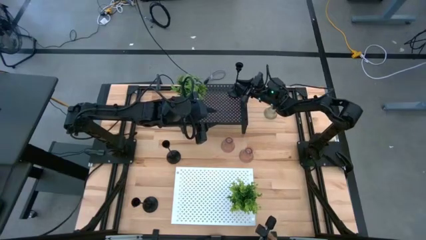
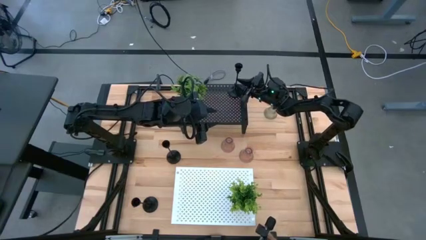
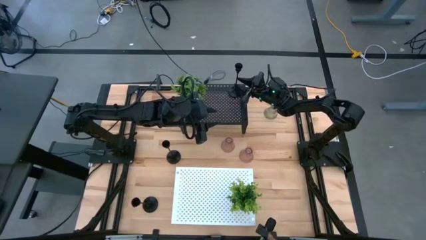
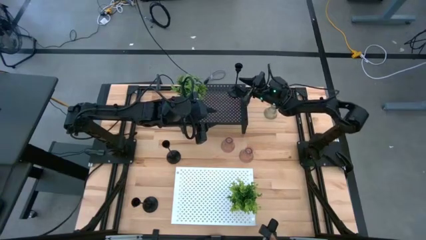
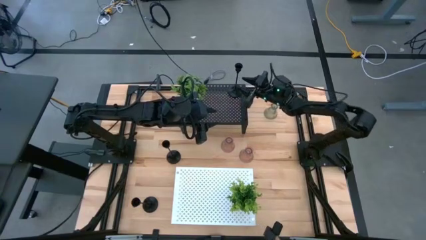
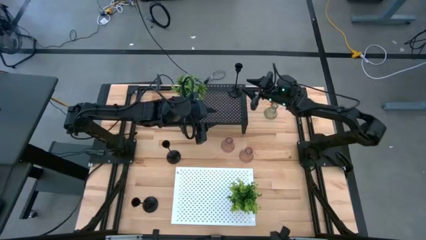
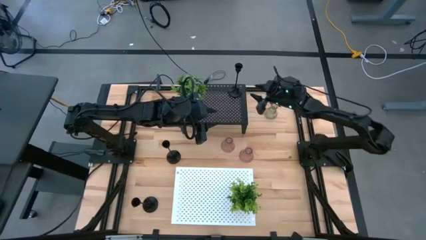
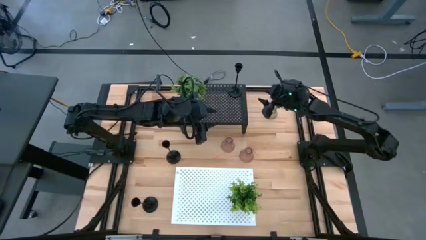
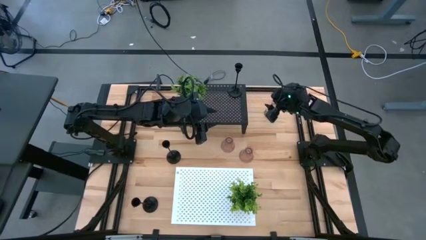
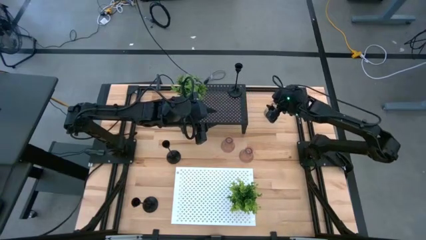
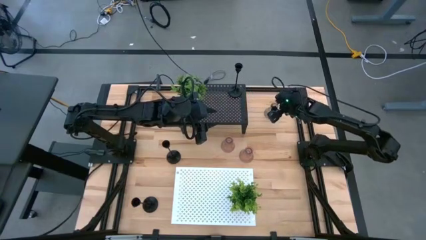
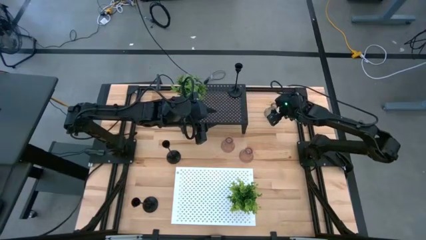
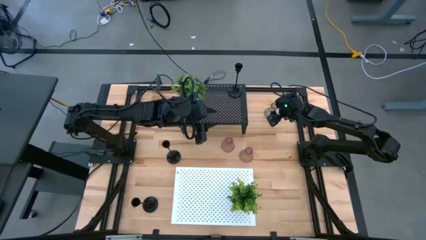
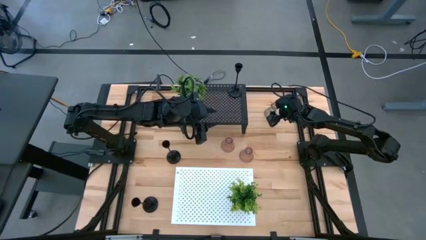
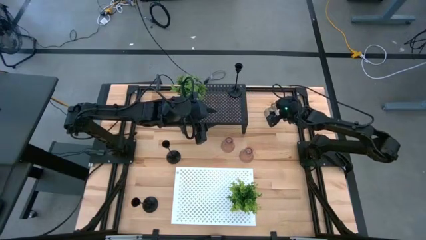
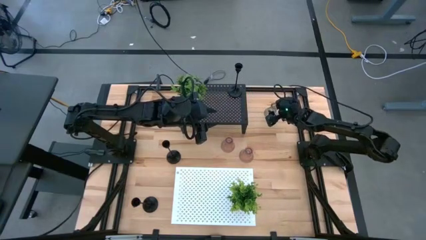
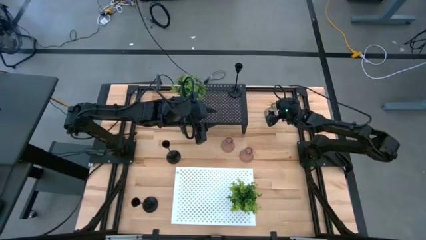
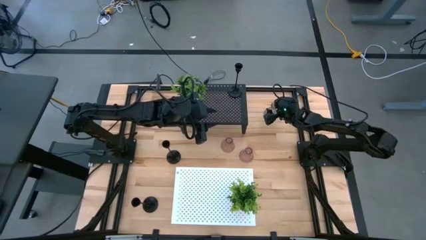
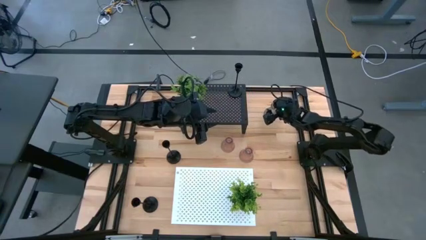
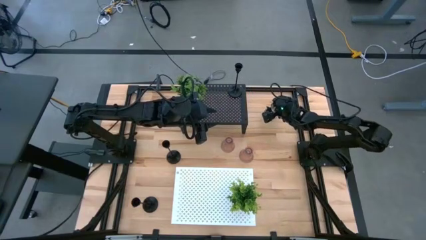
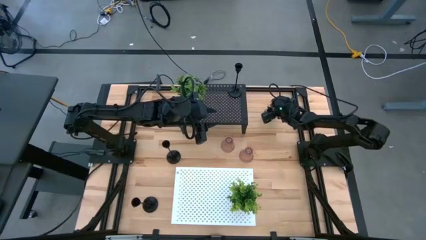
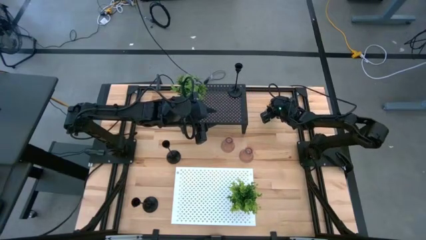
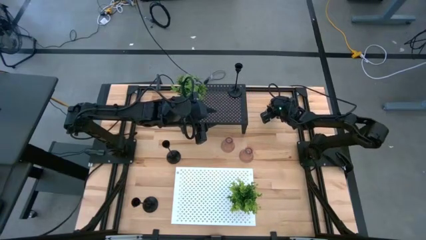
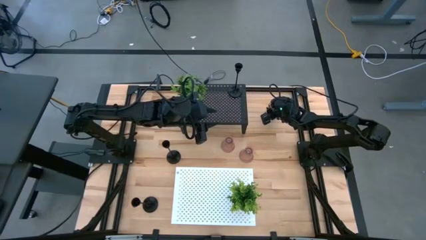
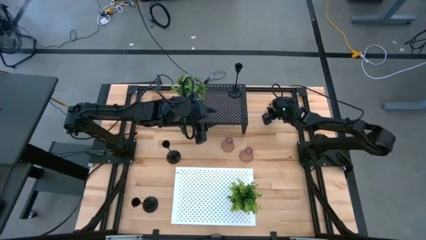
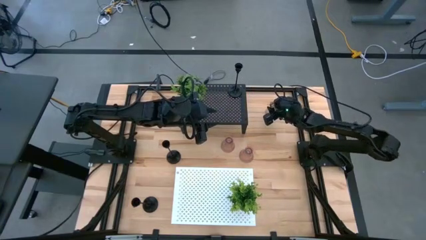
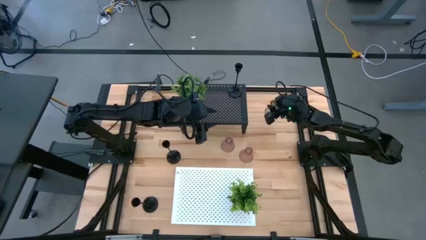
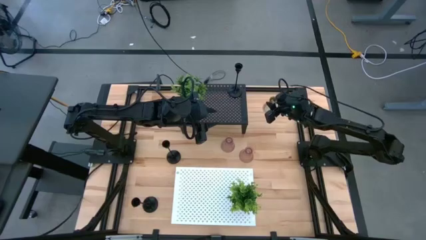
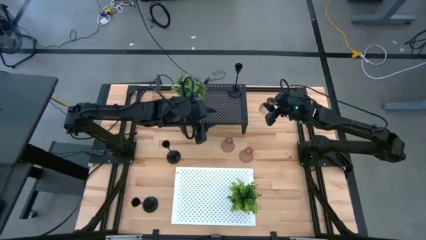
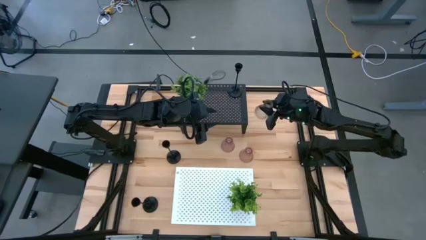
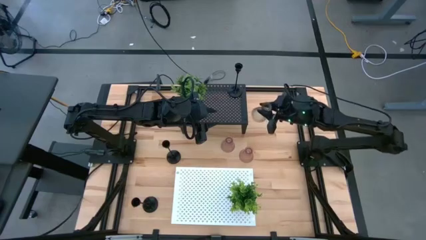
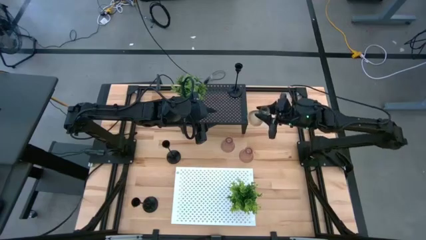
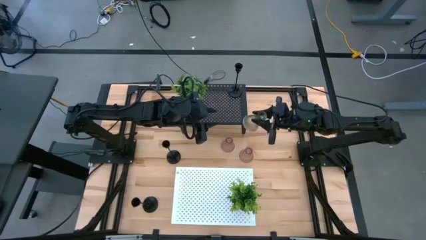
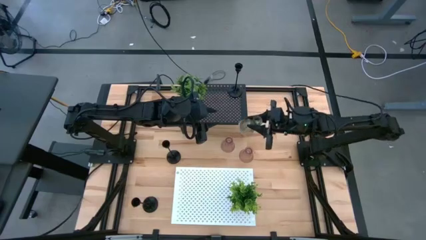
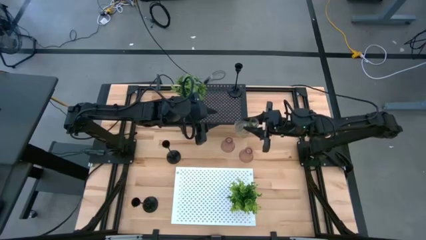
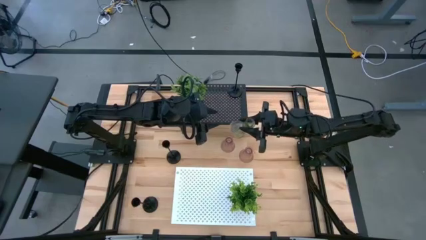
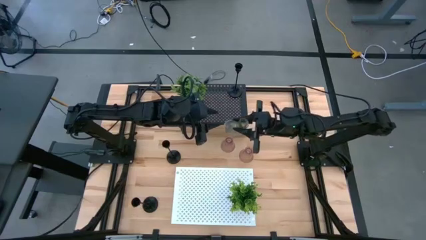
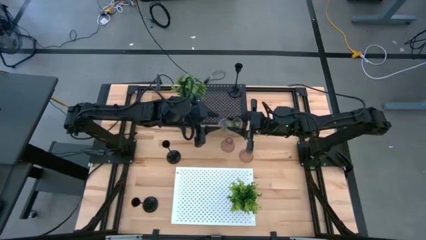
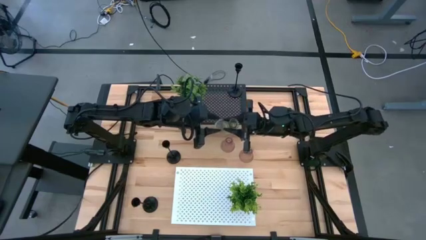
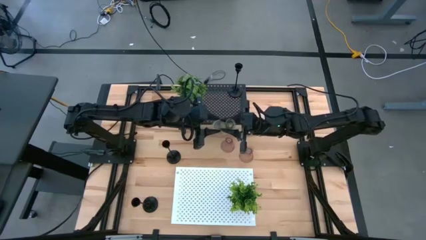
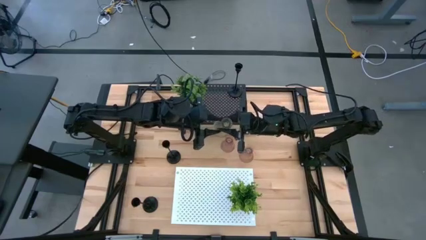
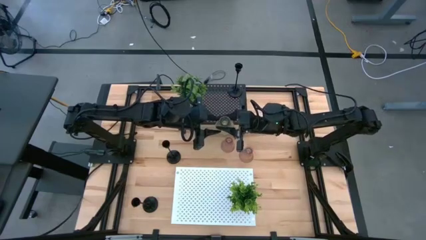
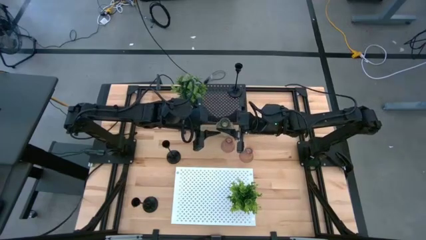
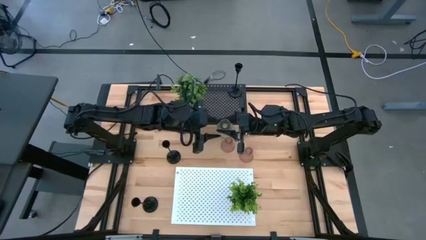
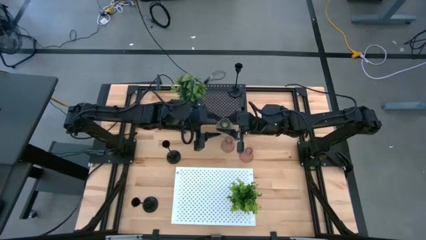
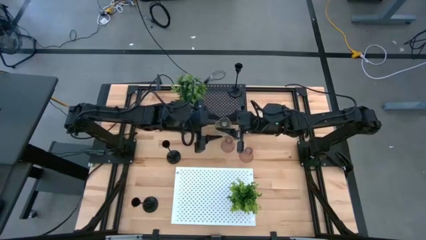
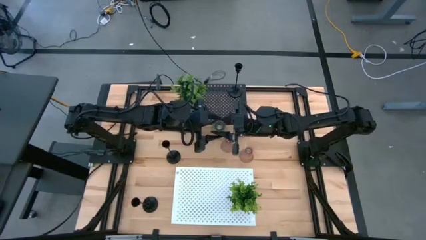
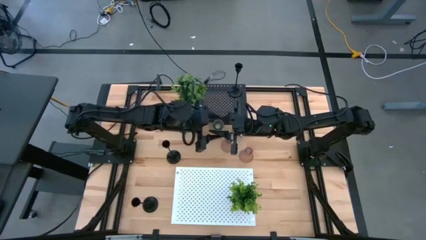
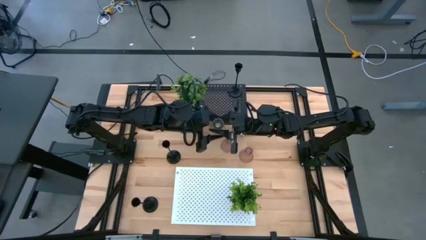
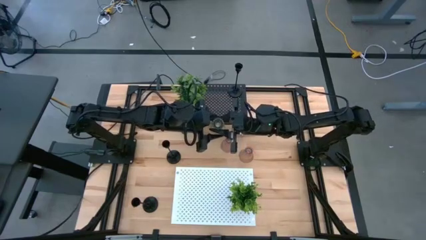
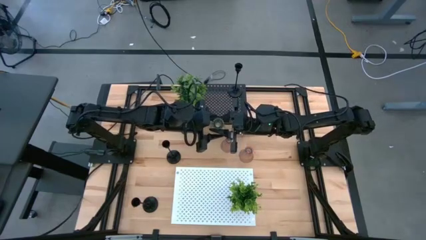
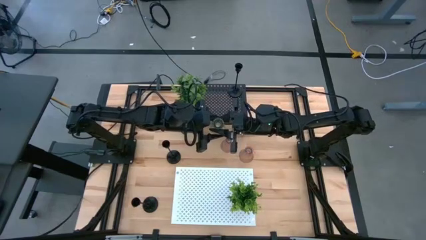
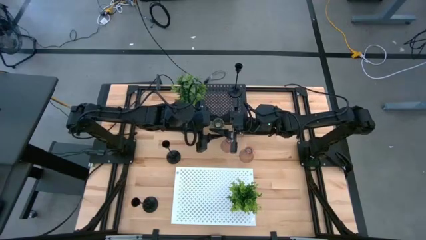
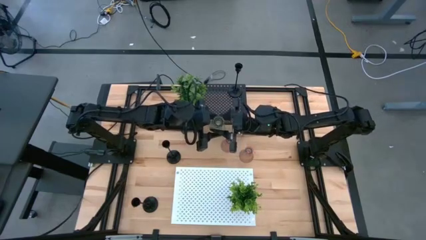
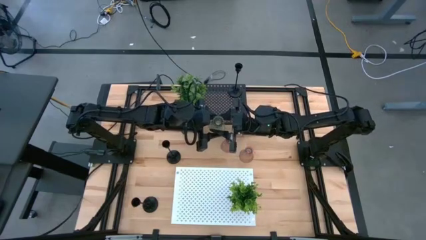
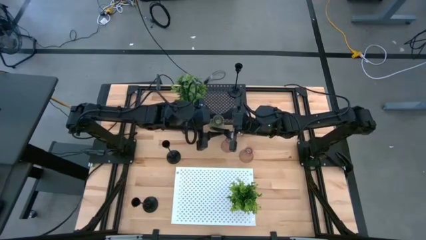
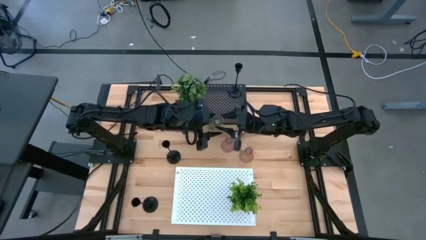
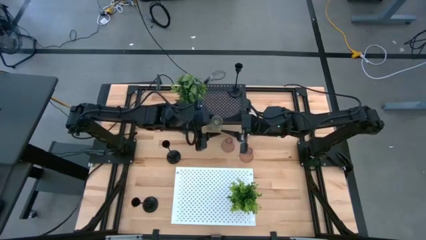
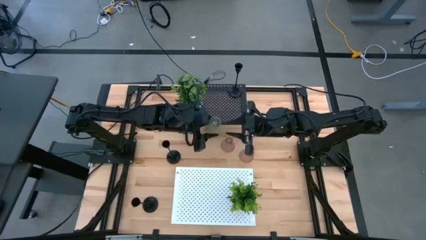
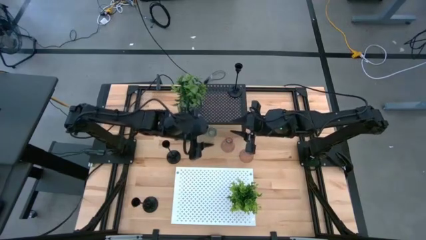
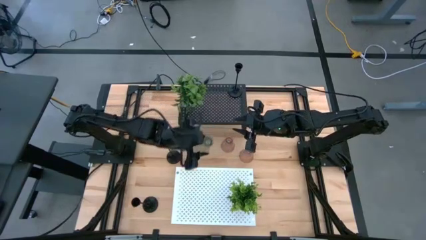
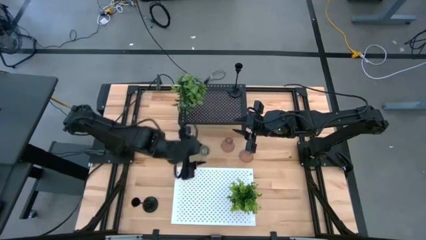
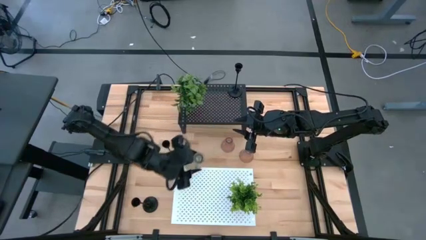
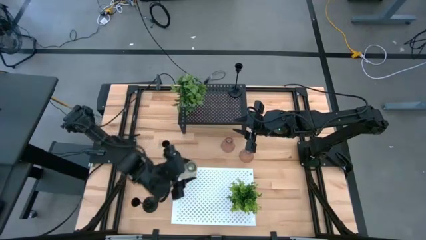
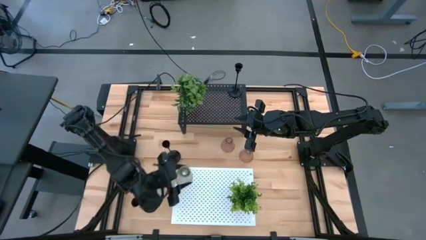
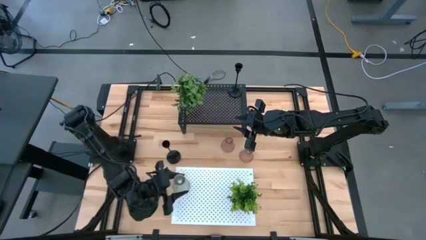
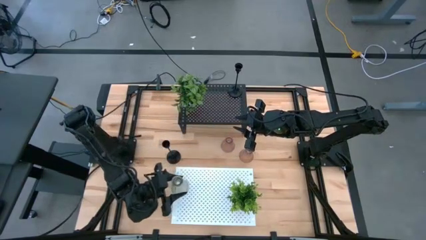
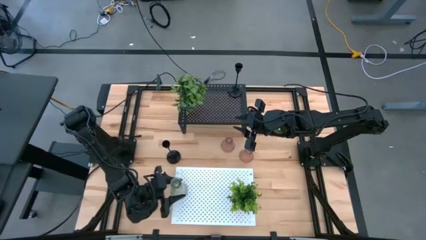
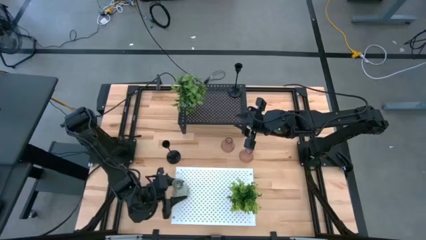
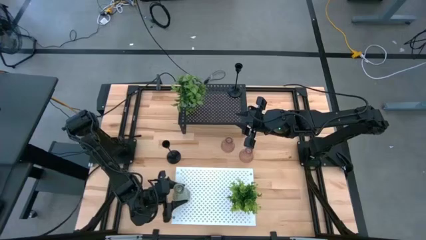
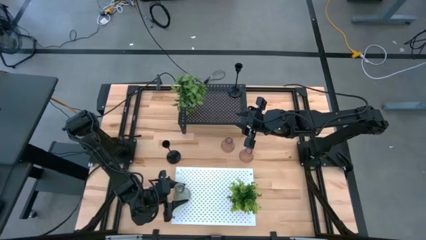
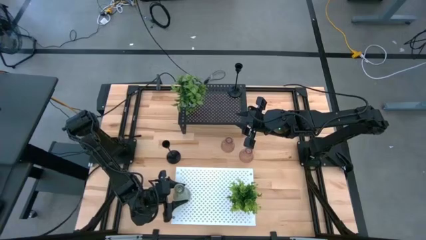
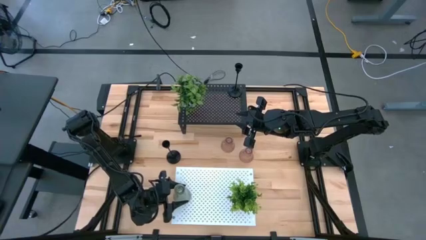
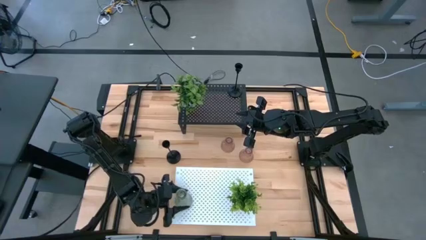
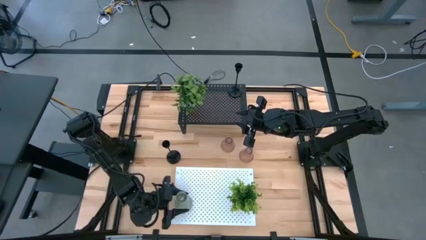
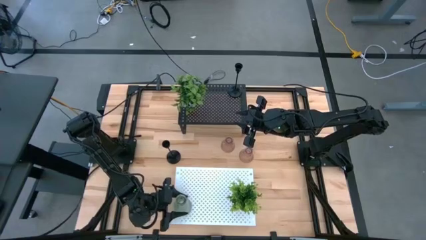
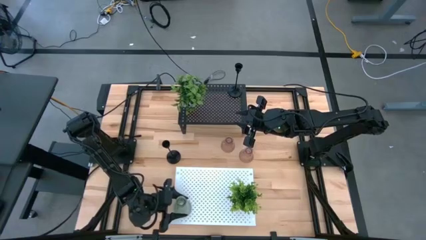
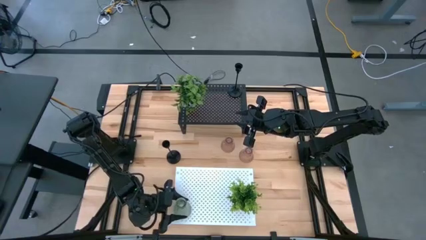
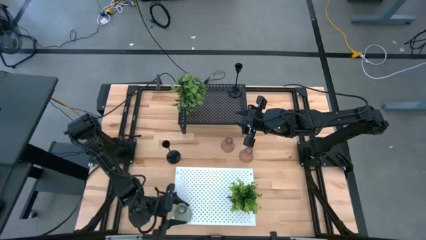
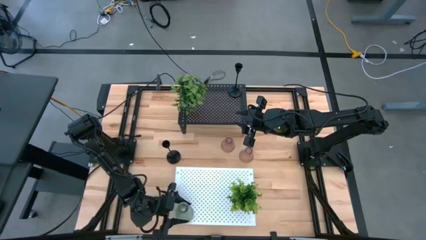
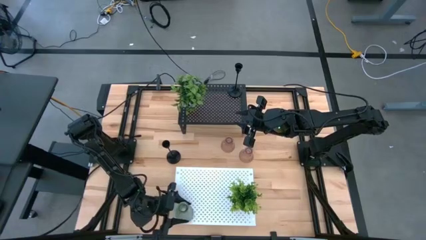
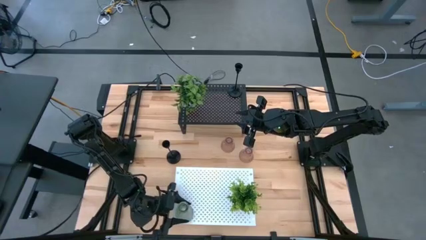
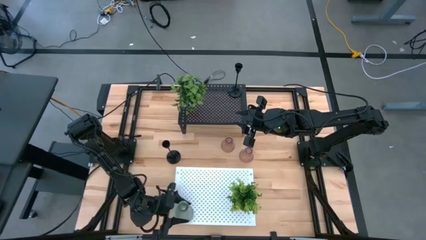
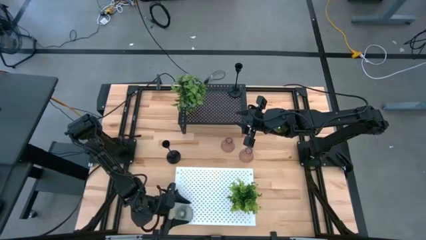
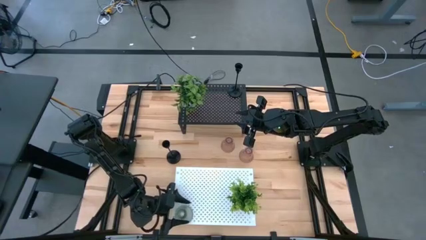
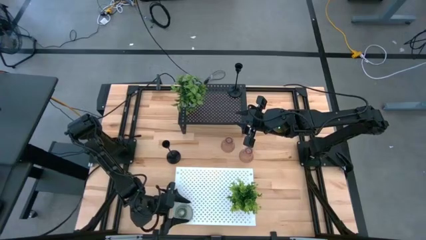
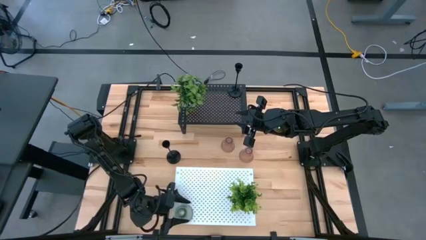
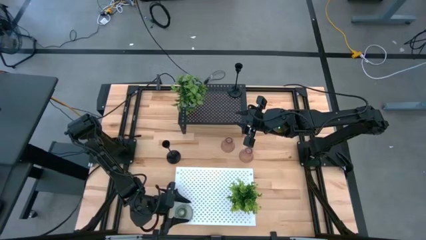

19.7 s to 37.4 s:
Task: Pick & Place candle stick holders
Put the small green glass candle holder on the white shelf
